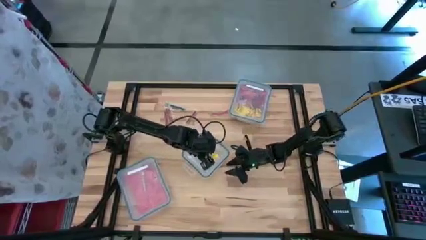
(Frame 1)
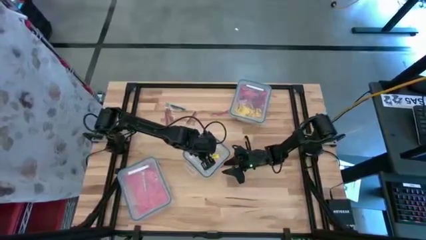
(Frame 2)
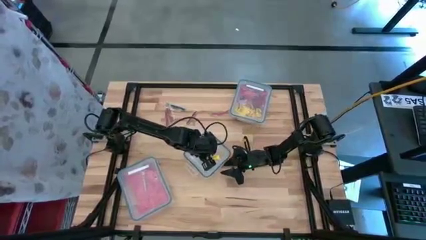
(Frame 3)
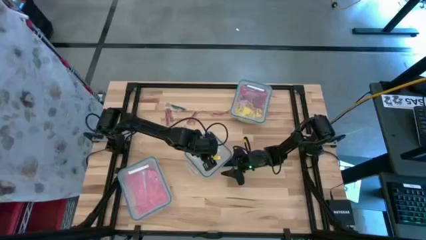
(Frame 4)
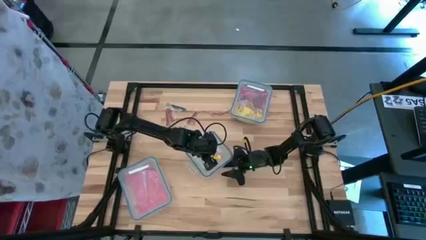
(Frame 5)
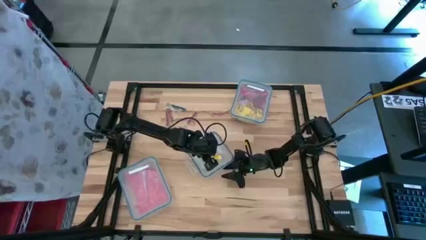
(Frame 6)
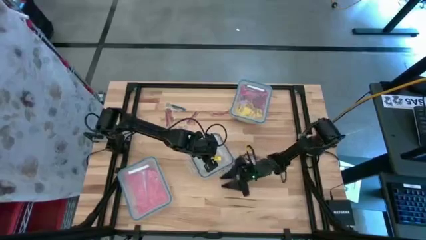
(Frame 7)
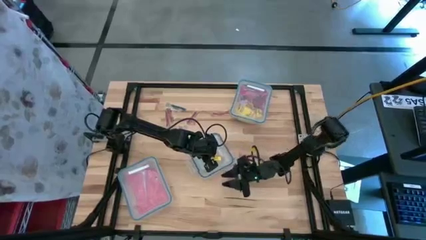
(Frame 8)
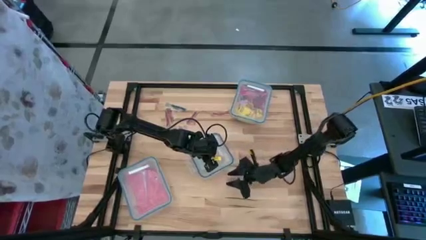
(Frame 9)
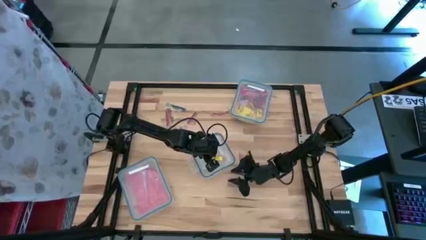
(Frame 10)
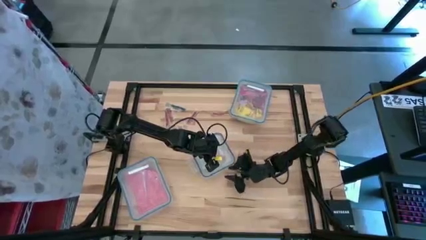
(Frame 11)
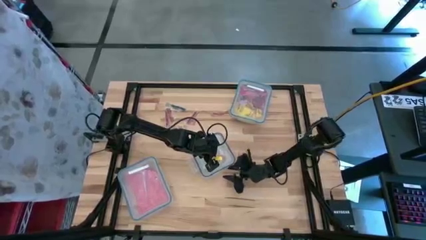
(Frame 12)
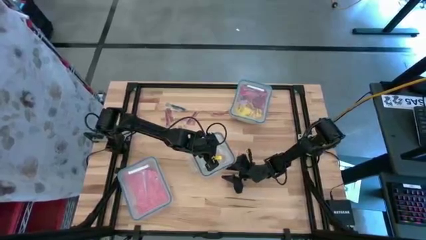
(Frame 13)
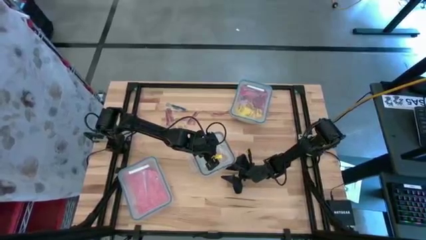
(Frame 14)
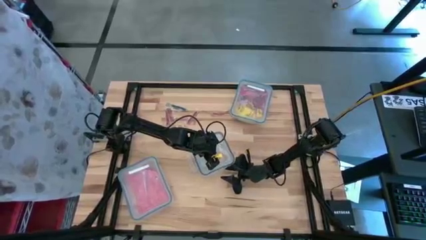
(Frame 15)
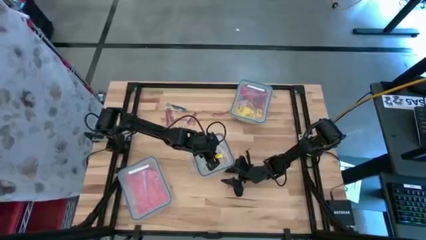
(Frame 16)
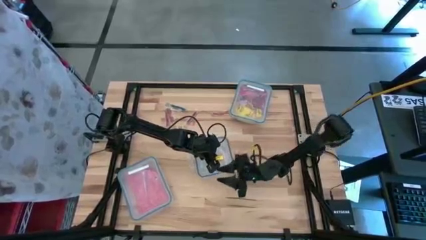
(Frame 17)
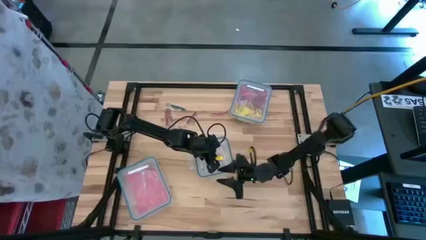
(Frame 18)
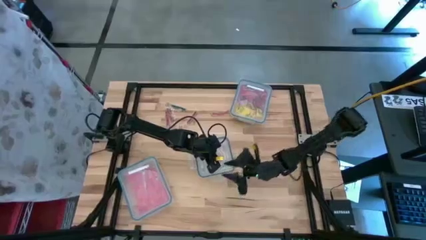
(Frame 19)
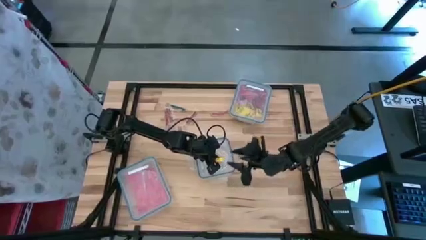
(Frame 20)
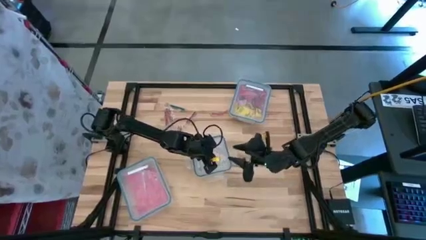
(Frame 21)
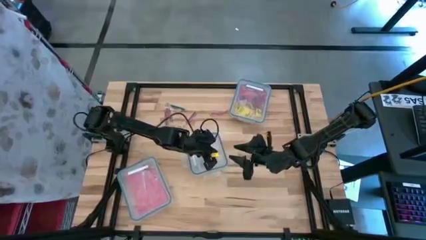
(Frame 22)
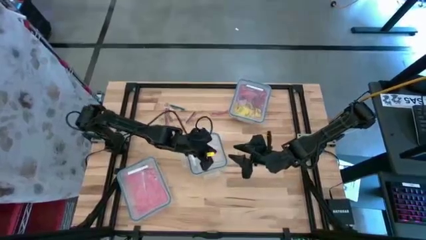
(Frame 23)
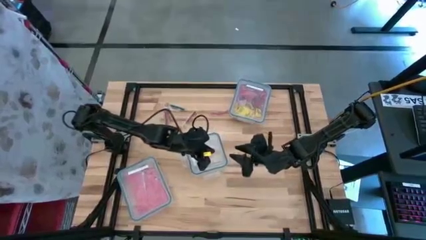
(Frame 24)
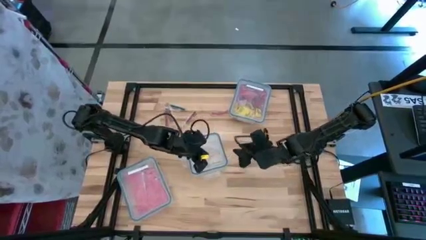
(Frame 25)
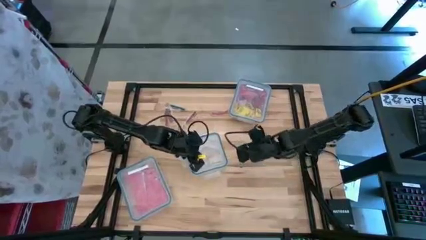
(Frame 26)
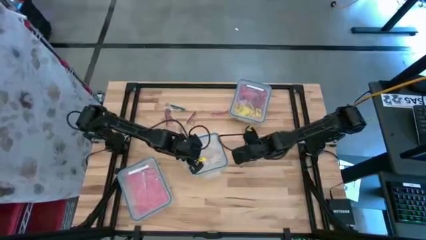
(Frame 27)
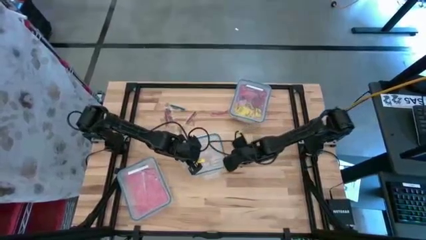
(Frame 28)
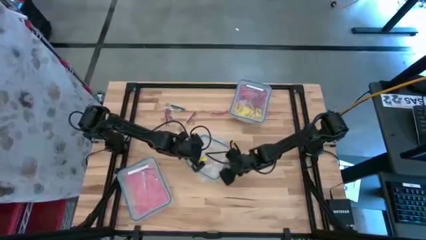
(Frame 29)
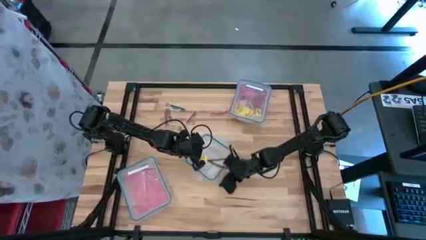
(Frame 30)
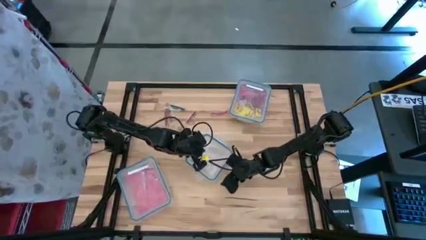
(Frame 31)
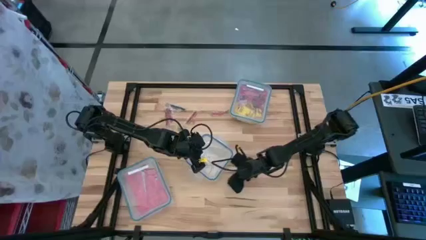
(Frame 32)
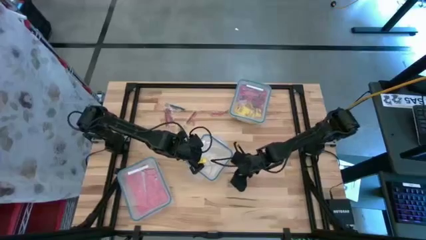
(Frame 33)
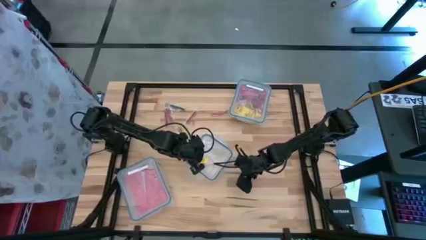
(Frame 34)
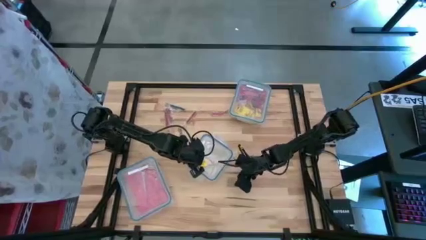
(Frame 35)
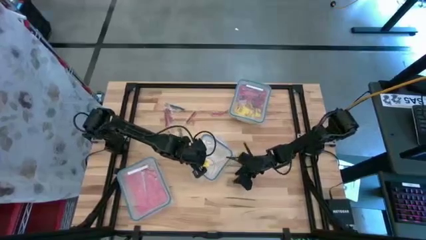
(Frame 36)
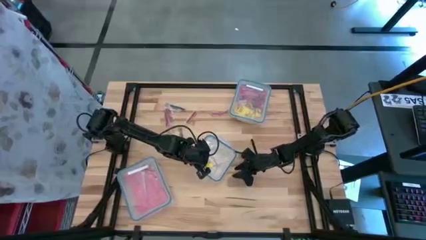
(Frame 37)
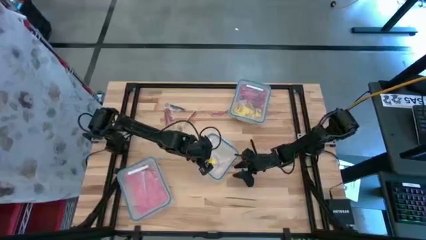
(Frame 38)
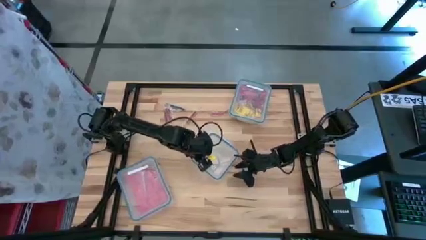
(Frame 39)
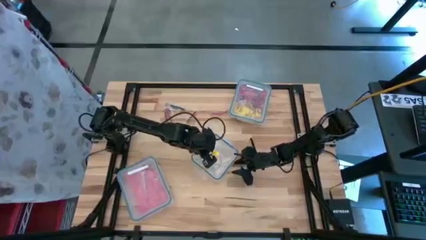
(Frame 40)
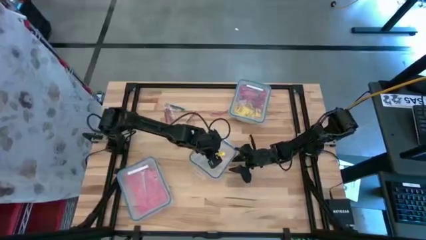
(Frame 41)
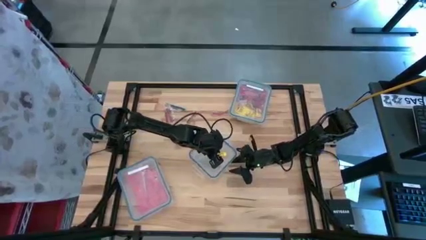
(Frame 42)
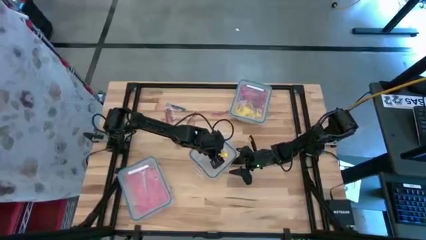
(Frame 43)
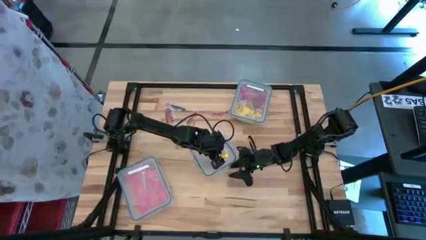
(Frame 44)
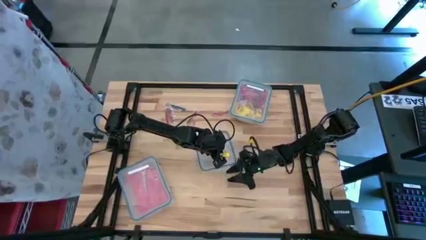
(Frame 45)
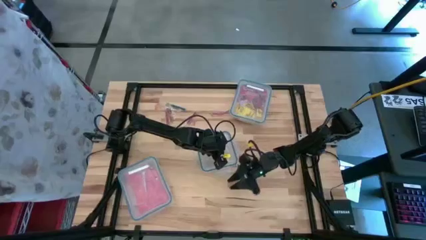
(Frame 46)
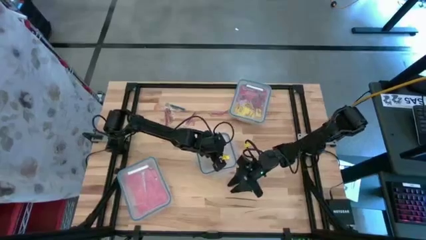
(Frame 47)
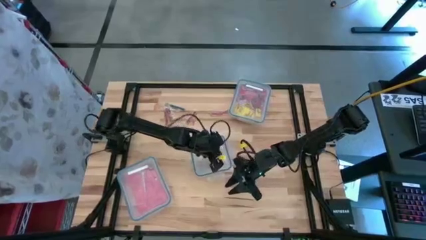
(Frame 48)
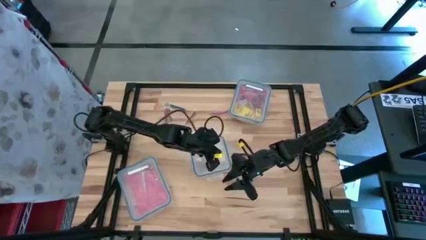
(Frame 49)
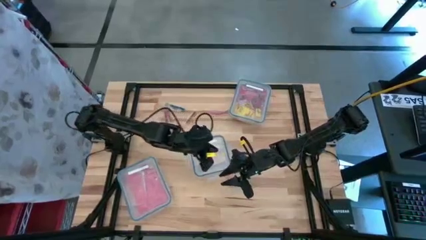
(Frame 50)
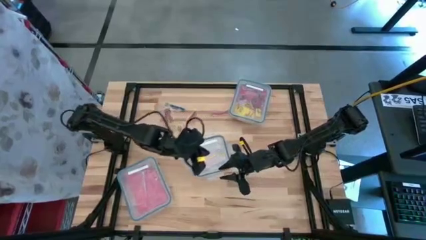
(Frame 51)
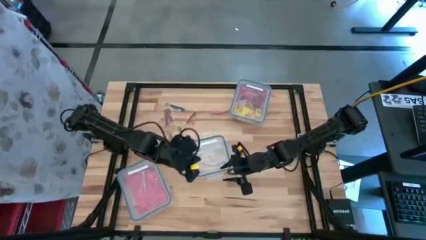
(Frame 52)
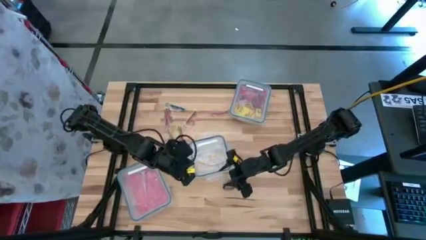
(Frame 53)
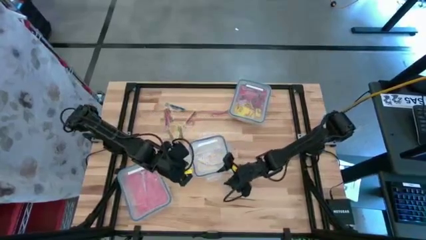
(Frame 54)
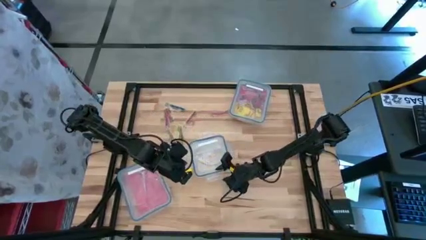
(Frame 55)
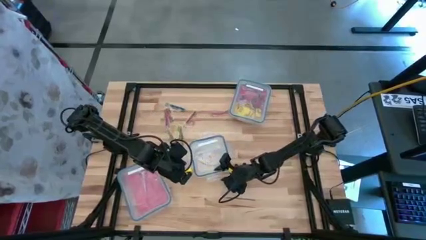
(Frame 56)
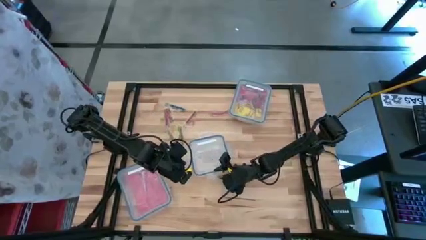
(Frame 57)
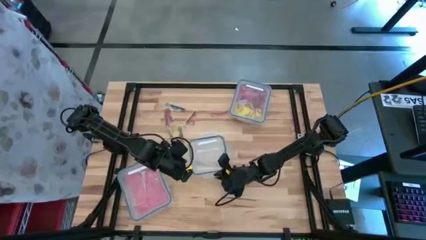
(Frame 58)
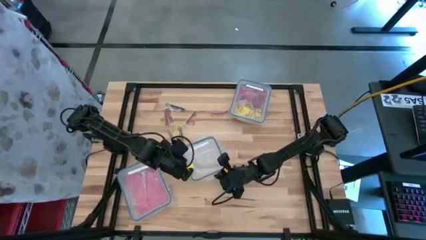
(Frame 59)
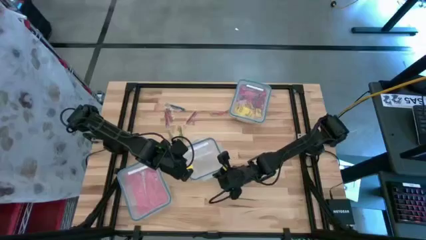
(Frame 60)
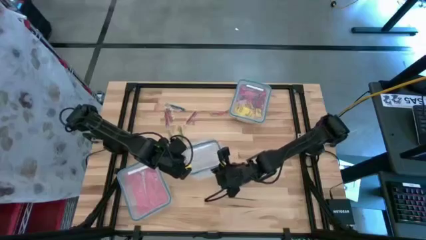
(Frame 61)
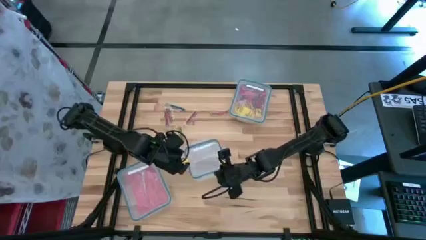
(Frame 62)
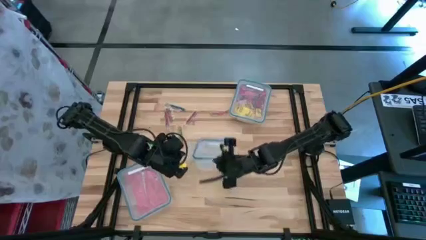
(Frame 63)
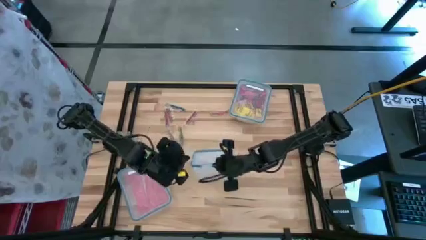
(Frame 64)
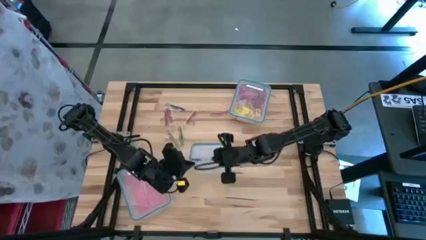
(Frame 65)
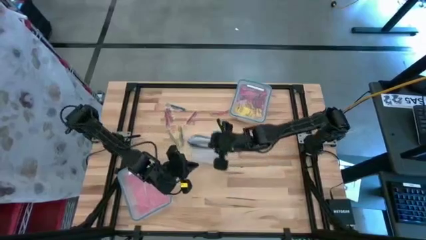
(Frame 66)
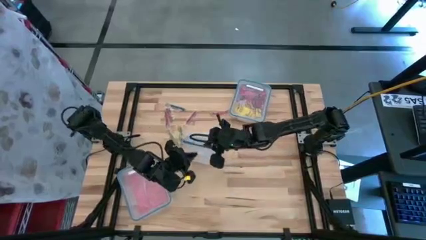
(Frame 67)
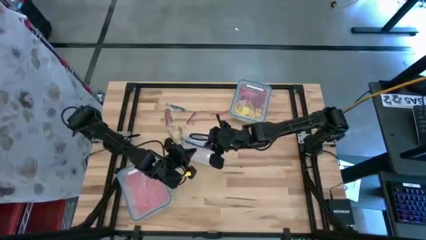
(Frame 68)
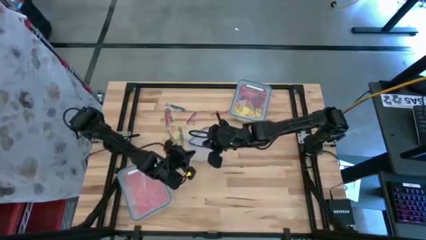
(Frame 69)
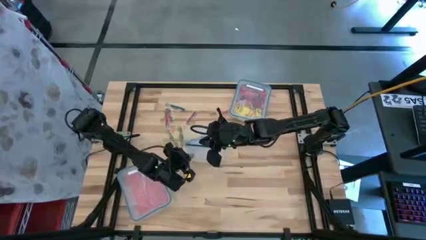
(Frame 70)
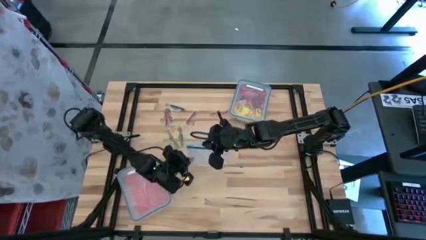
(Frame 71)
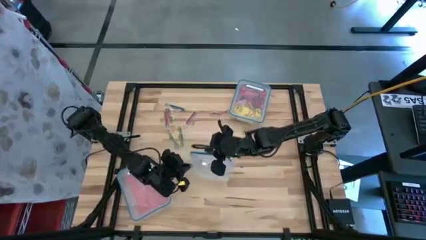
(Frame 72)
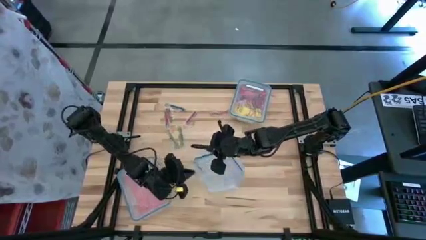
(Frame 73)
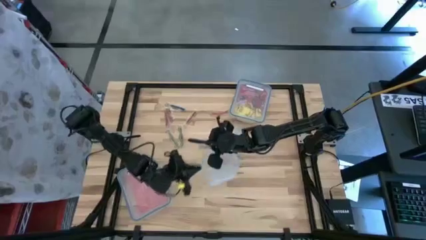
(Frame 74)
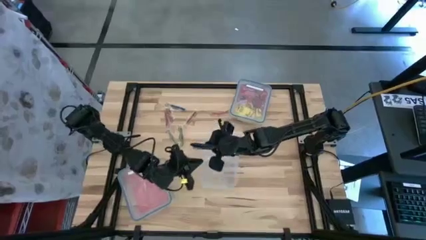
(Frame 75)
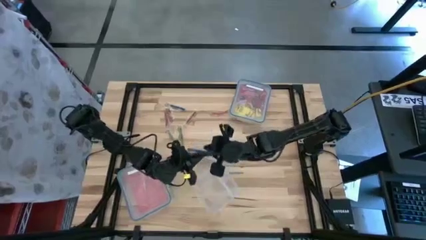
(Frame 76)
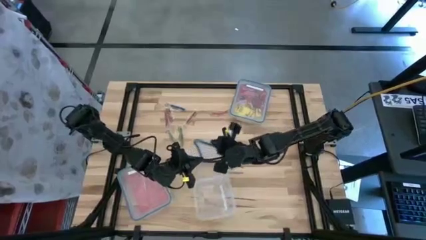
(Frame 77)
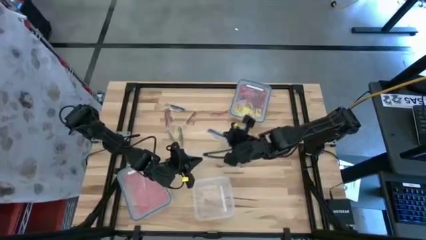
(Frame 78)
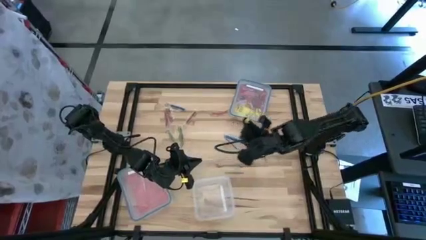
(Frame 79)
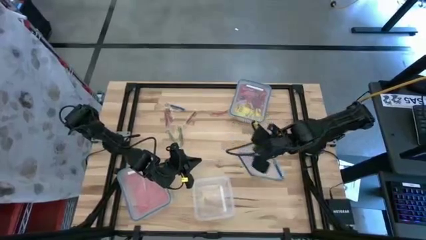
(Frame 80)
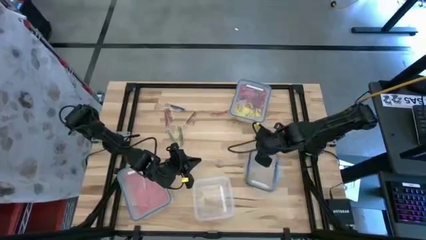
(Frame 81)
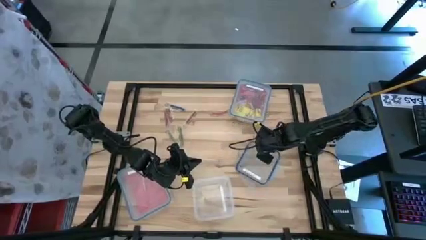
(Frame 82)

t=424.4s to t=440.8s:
Task: Sort candy
Open the square transparent bin
